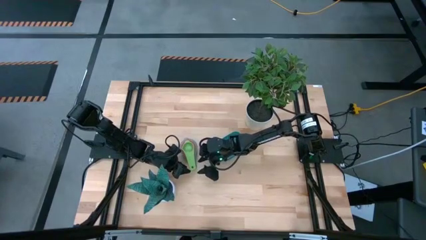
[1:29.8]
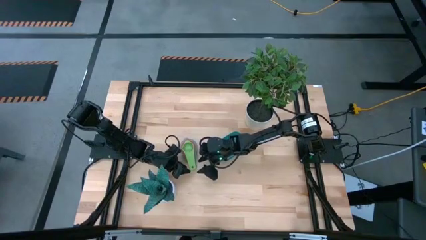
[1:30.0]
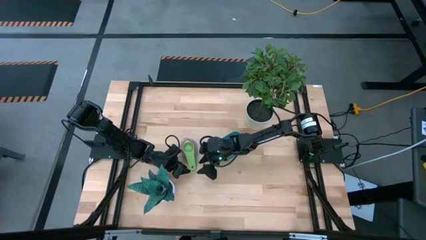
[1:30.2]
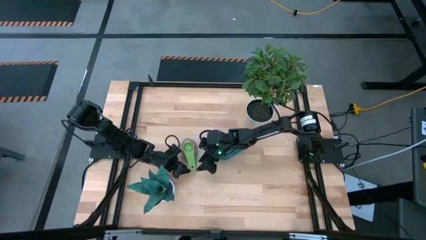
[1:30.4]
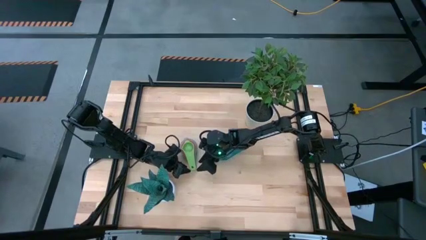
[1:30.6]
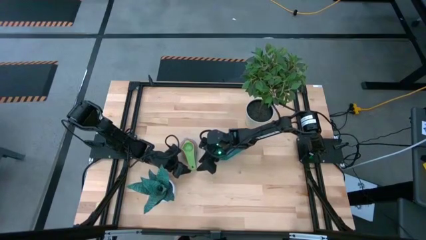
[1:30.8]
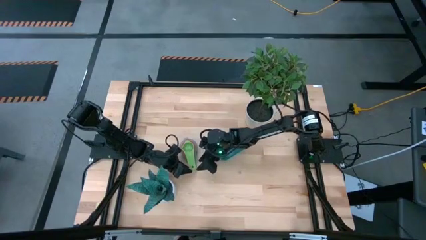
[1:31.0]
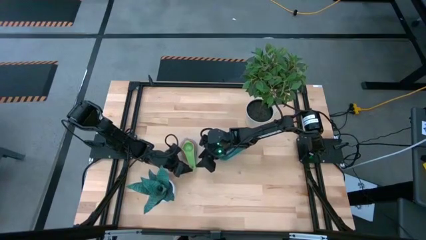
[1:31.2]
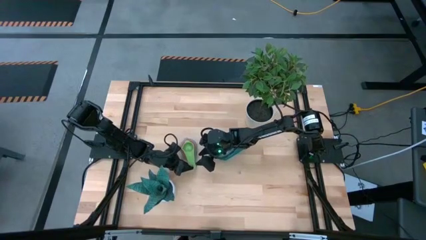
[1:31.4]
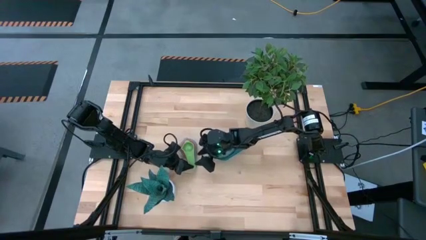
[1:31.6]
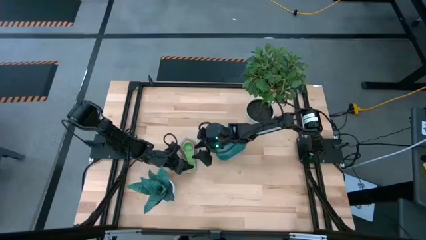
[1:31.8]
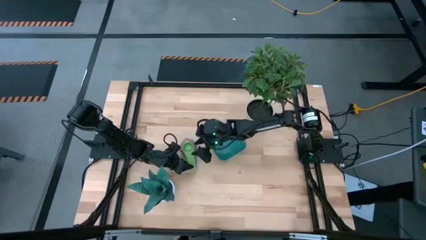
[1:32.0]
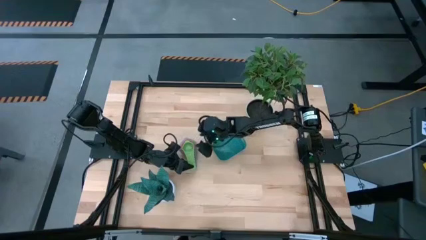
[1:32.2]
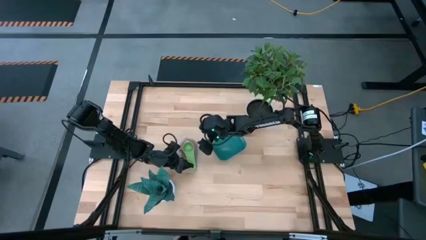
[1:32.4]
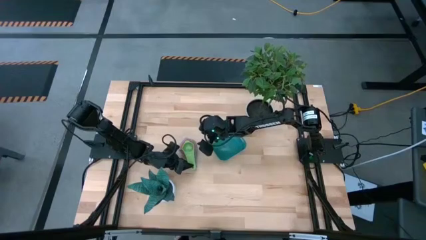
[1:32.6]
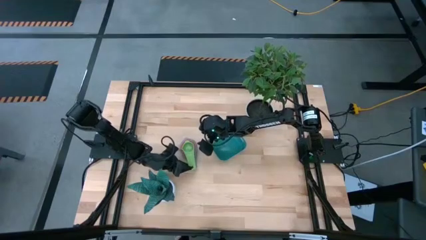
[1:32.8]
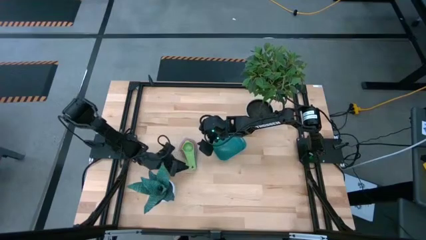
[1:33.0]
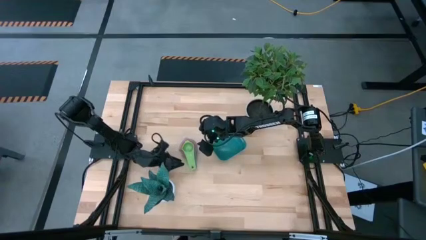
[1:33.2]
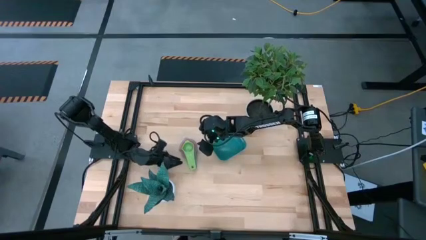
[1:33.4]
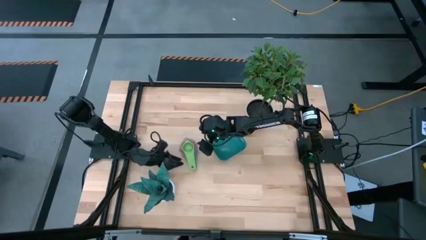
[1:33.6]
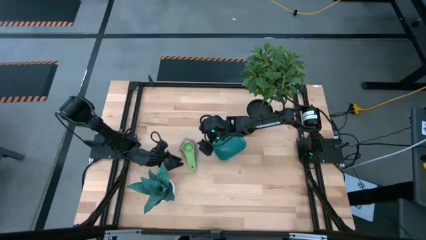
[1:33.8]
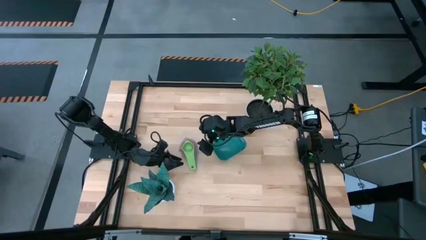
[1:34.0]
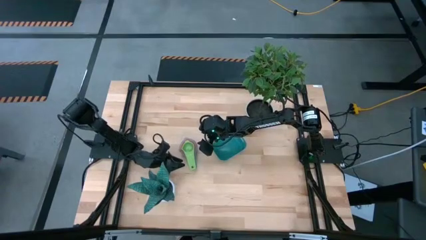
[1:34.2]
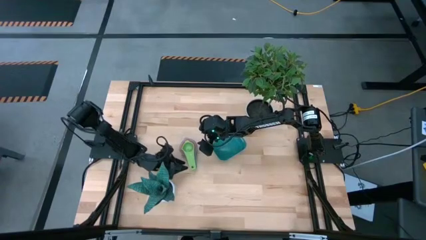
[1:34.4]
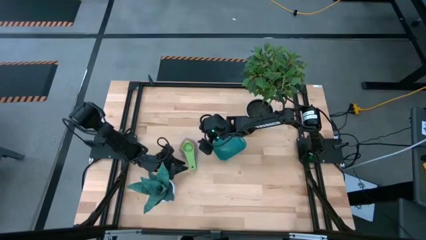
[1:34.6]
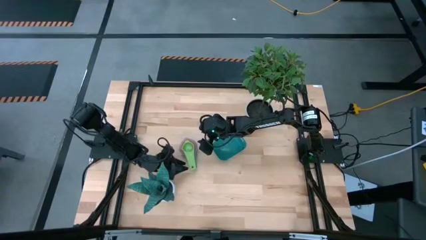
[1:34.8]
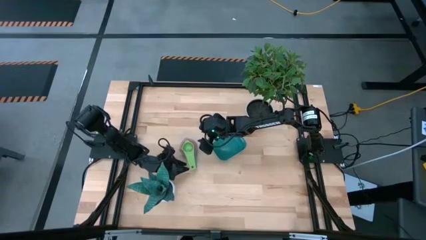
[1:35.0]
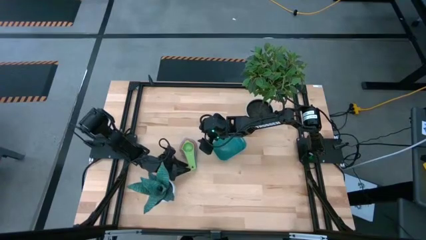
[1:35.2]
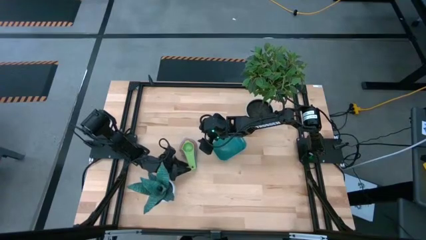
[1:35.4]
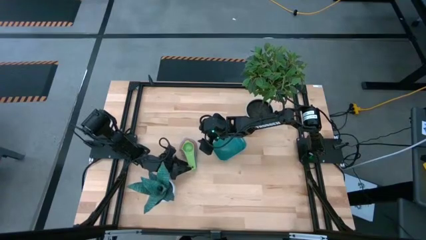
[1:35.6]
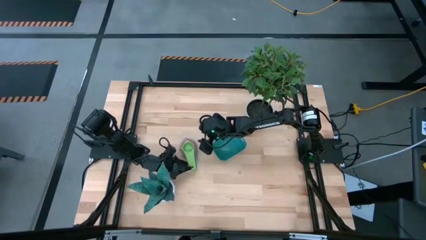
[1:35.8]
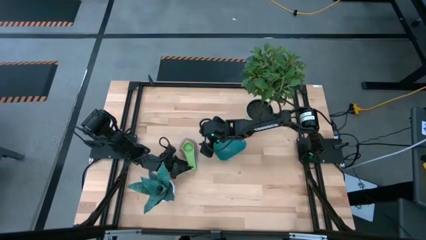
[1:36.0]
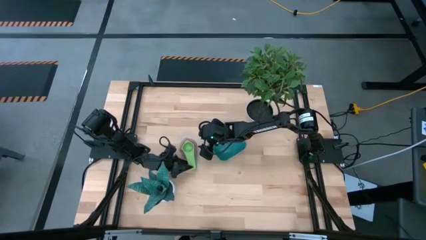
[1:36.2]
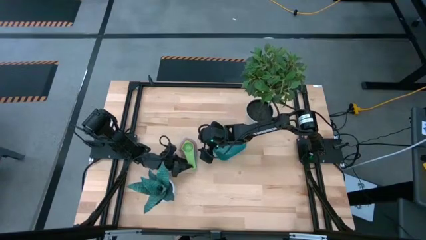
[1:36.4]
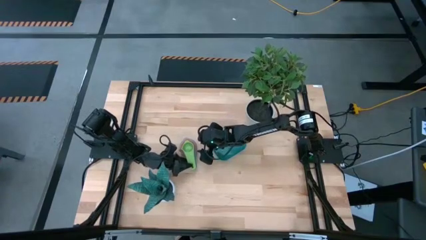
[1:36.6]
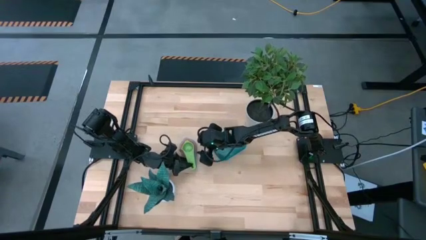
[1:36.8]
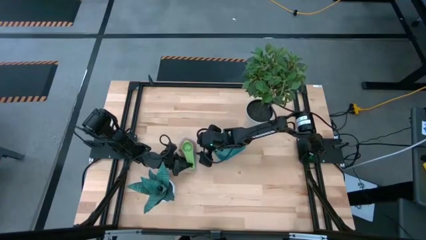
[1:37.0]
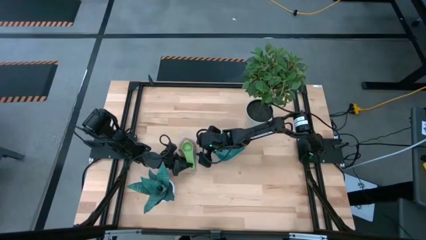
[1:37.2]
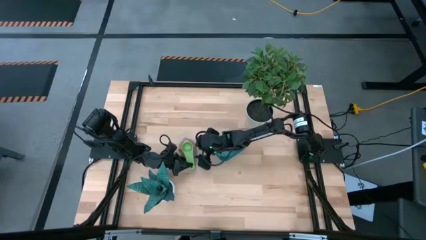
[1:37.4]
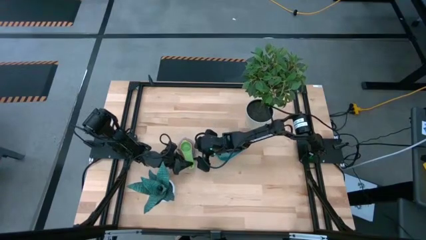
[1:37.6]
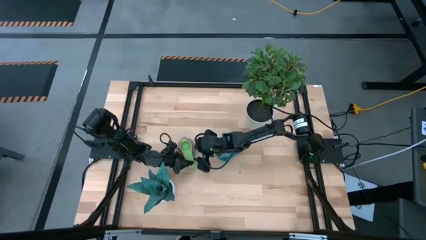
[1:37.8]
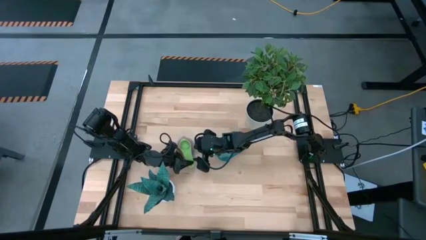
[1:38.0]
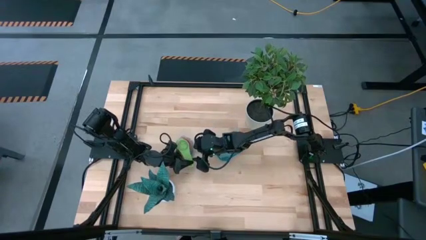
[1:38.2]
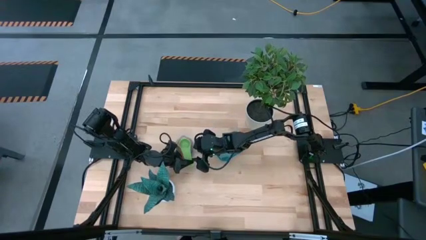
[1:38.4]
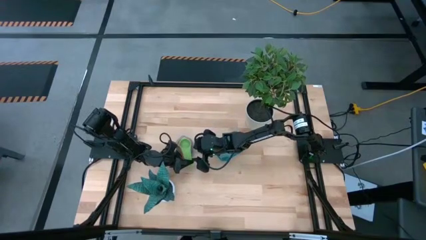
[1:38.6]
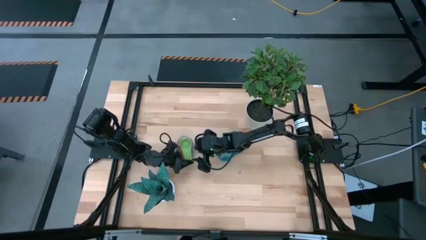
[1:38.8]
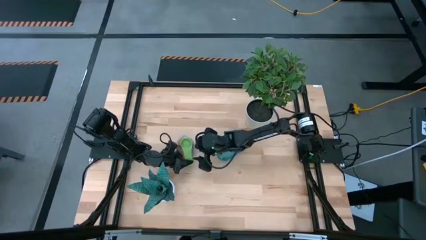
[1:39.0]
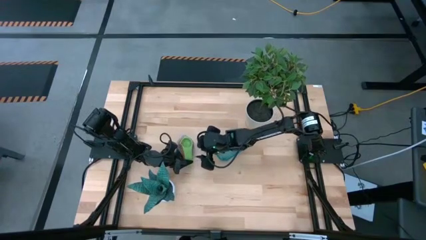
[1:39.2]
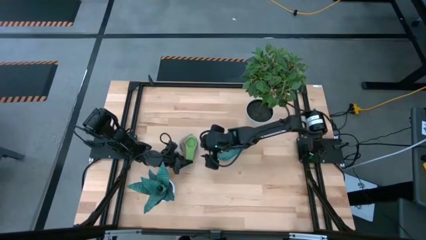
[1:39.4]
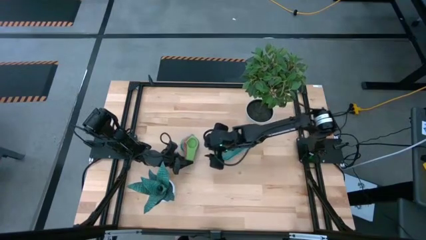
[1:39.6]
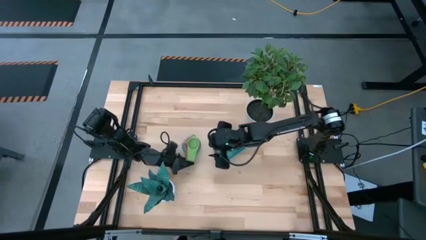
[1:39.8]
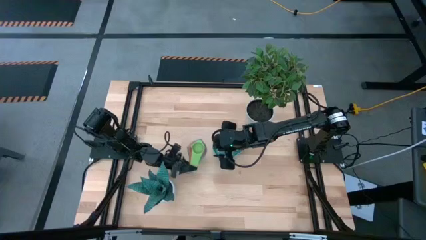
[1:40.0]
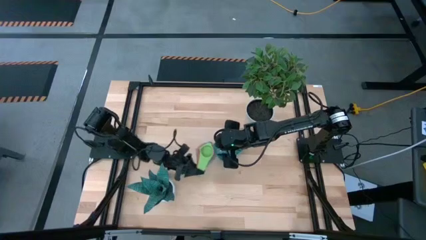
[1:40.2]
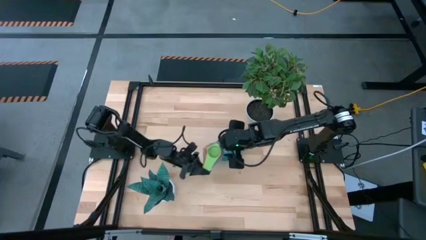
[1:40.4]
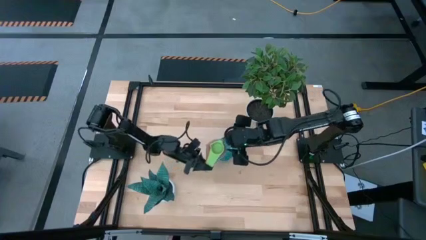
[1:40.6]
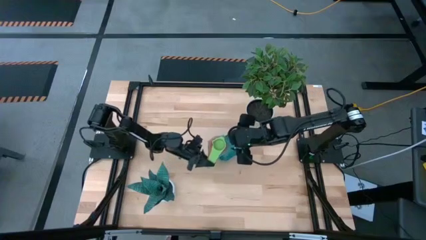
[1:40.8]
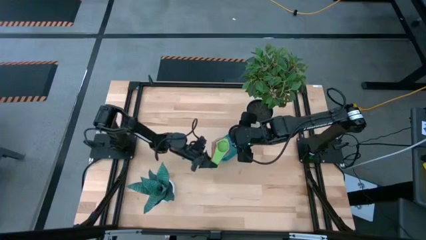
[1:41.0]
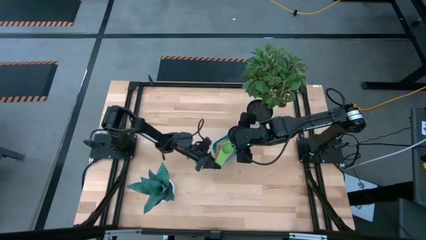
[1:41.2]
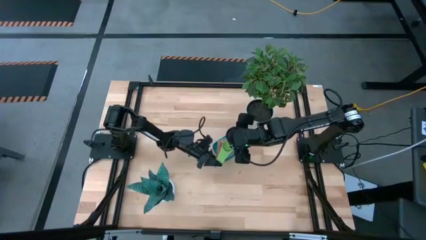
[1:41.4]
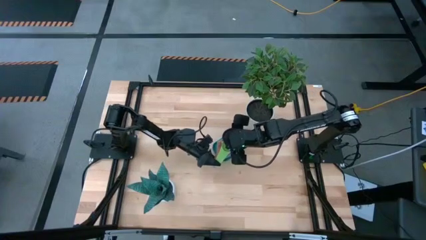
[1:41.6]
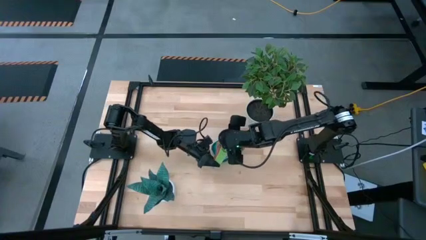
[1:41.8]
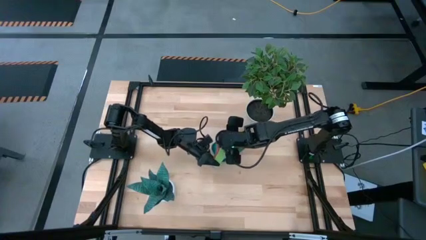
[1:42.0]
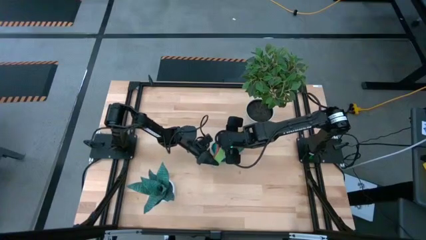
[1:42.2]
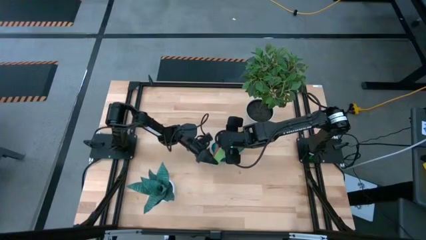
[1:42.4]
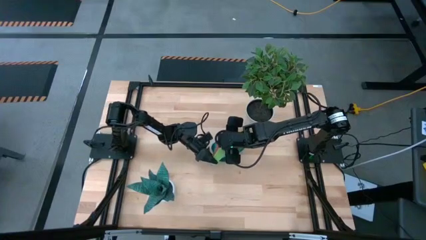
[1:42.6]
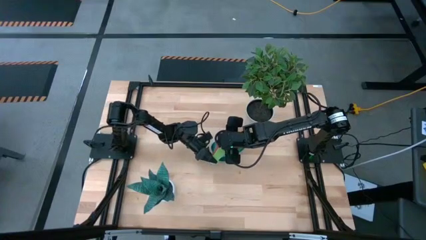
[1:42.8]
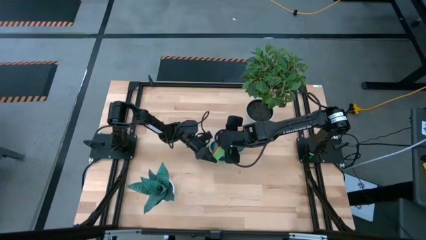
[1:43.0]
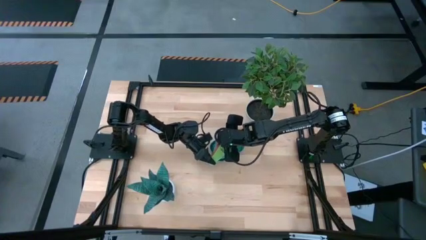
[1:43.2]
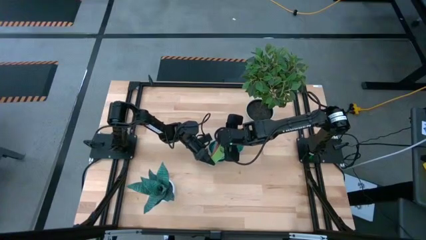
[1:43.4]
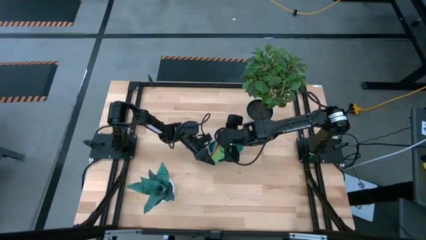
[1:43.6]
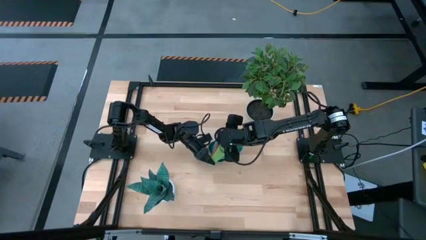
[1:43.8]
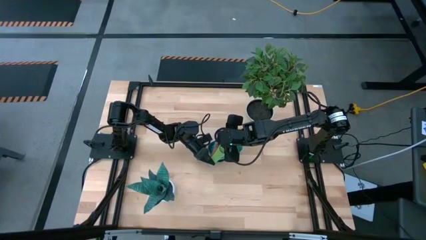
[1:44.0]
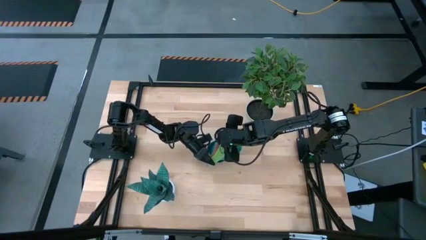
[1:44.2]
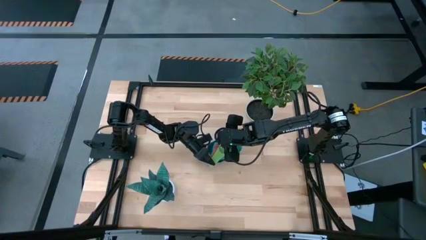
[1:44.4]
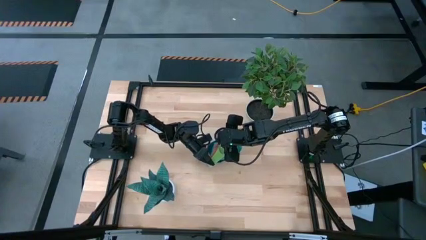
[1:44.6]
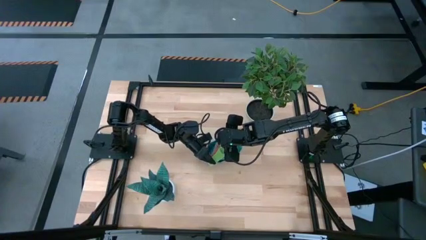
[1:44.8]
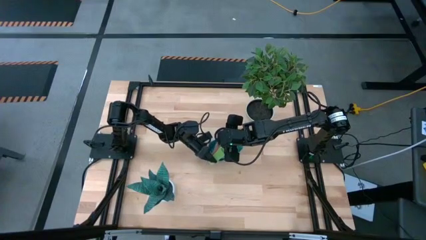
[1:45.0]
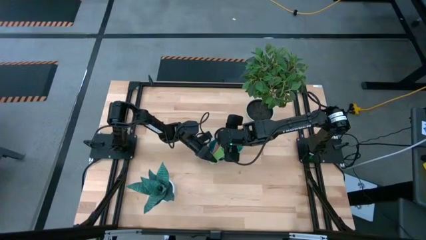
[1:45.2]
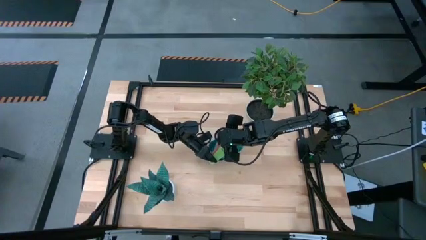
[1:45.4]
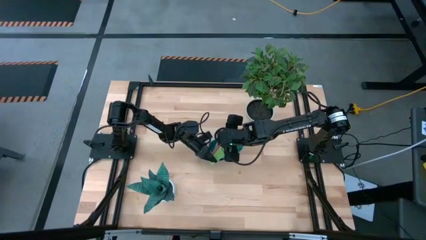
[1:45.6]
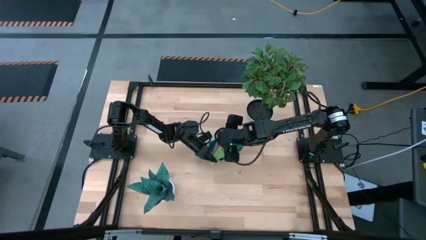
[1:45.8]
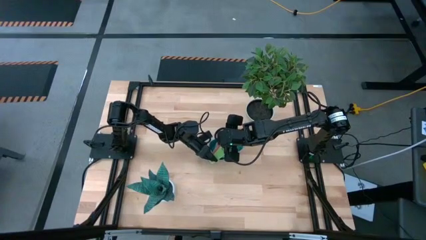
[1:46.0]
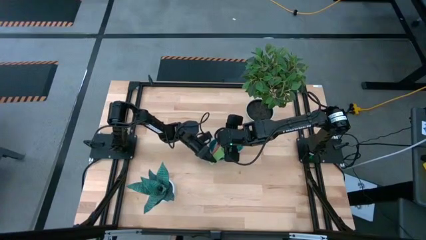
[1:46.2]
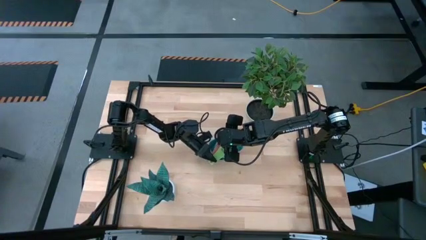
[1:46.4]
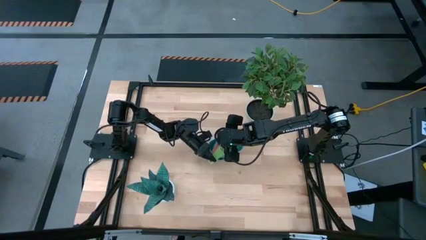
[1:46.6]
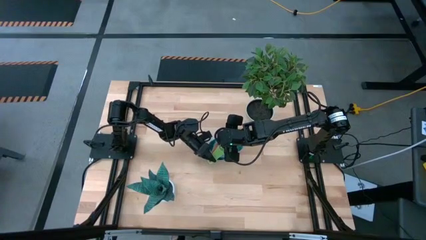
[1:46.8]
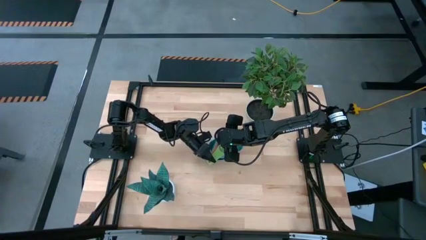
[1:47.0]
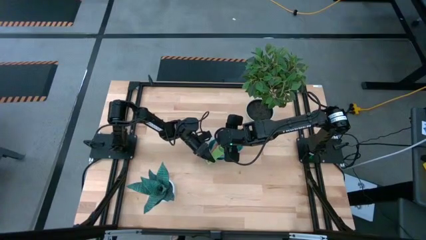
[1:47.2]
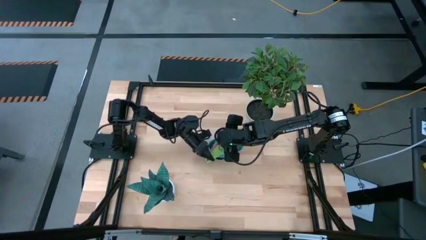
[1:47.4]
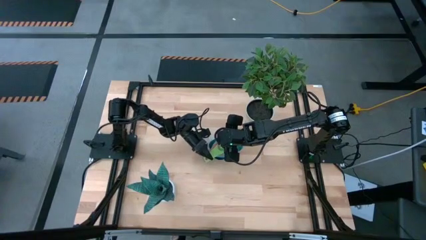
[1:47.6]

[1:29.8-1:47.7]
Task: Nest measuring cups in basket
Put the stacked measuring cups into the green bin
